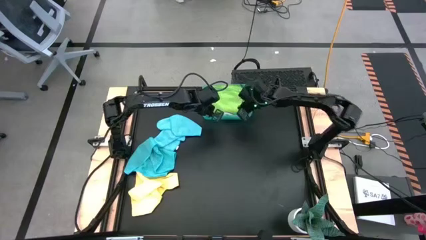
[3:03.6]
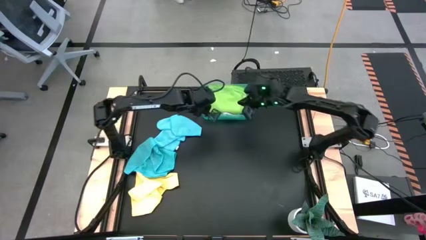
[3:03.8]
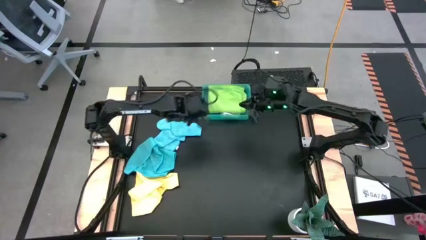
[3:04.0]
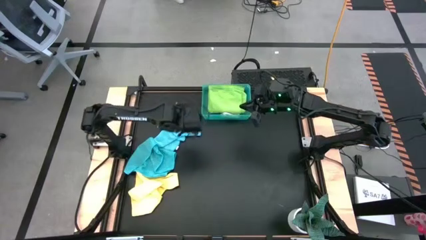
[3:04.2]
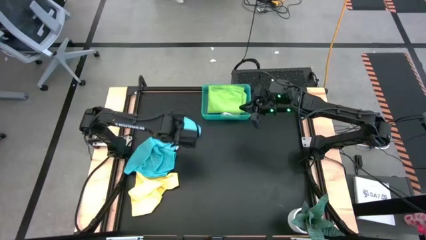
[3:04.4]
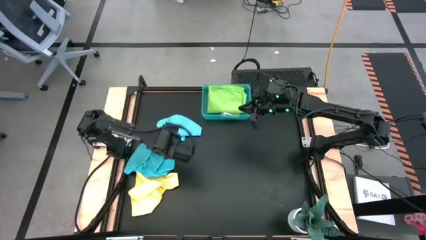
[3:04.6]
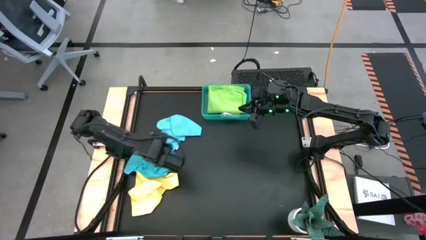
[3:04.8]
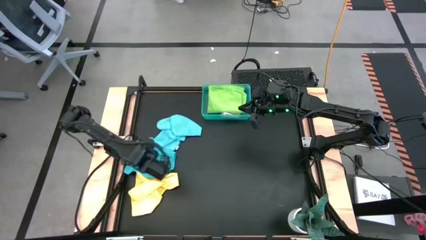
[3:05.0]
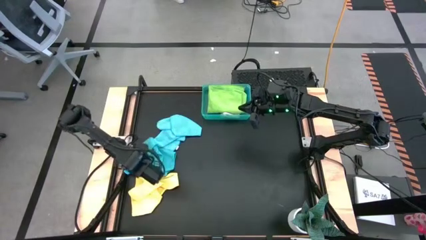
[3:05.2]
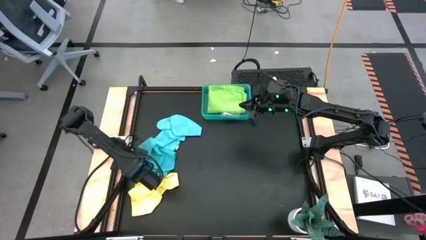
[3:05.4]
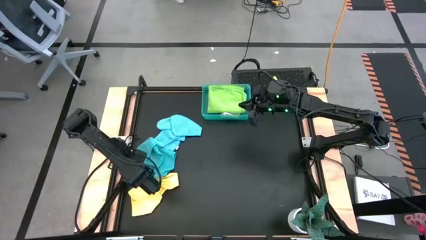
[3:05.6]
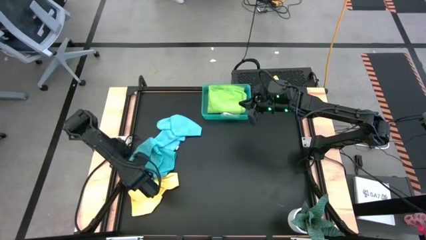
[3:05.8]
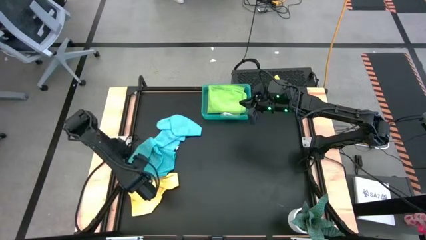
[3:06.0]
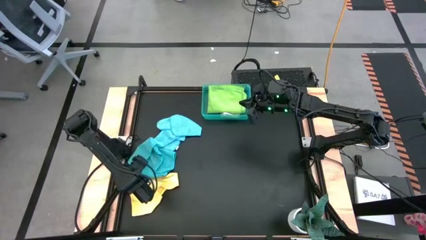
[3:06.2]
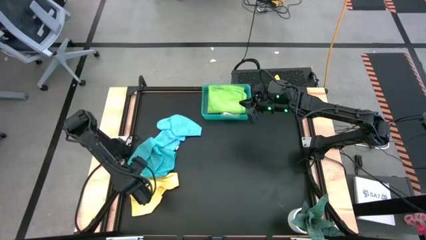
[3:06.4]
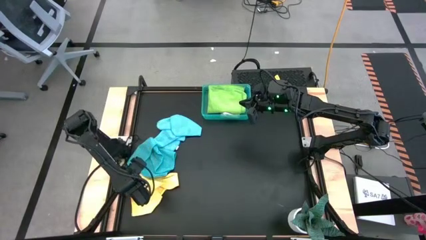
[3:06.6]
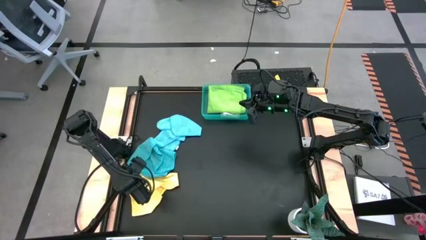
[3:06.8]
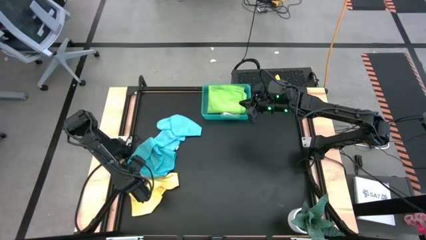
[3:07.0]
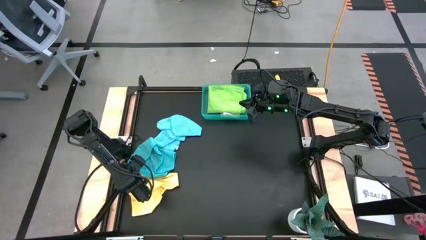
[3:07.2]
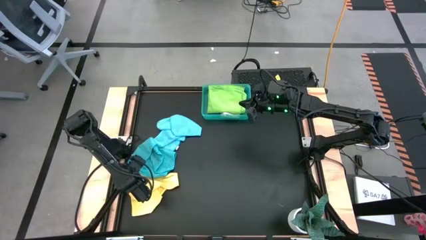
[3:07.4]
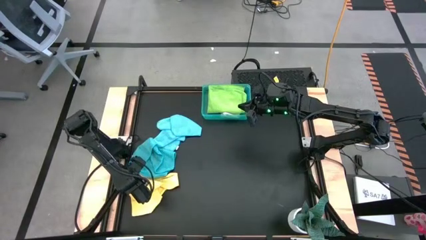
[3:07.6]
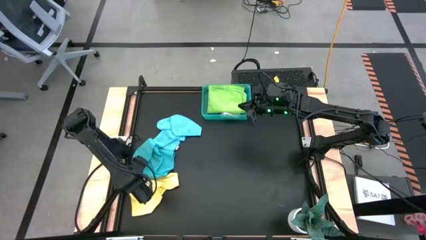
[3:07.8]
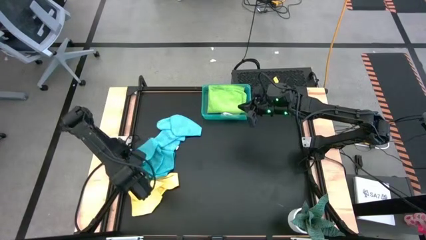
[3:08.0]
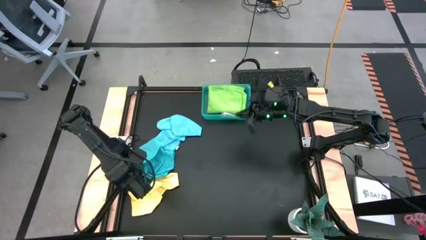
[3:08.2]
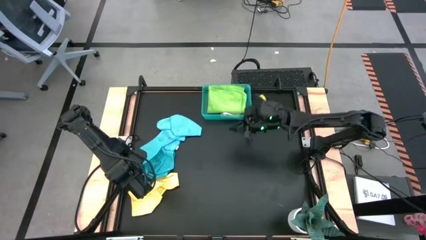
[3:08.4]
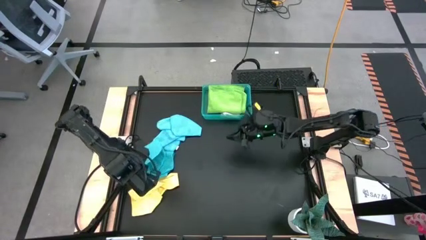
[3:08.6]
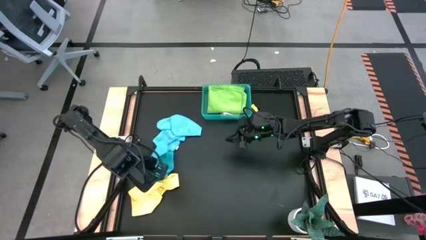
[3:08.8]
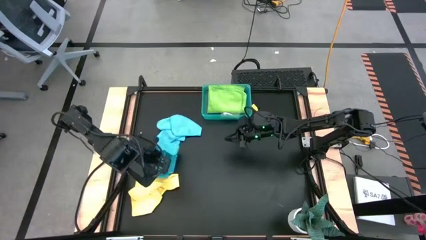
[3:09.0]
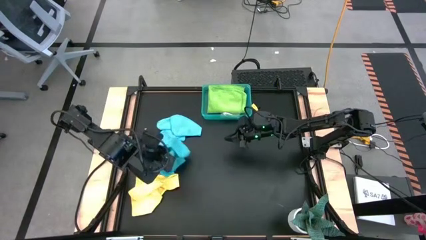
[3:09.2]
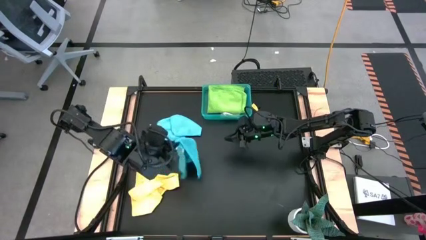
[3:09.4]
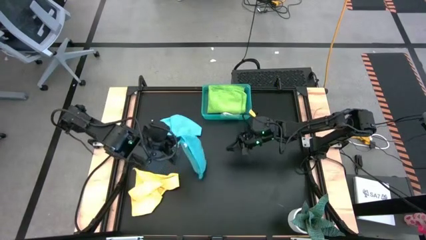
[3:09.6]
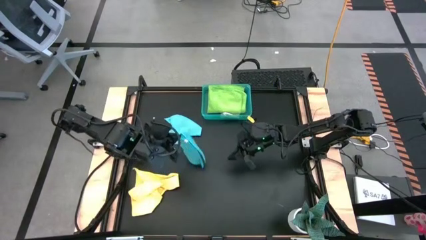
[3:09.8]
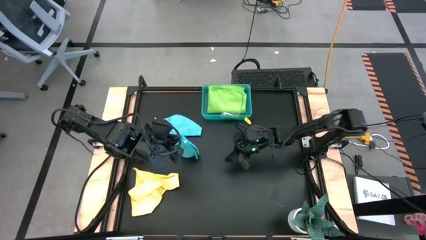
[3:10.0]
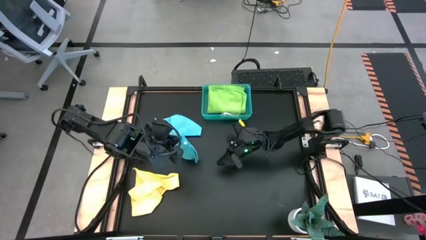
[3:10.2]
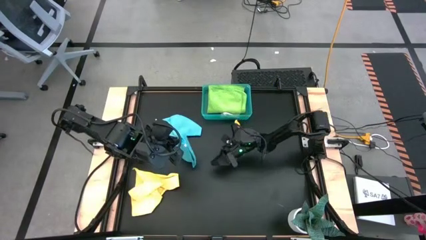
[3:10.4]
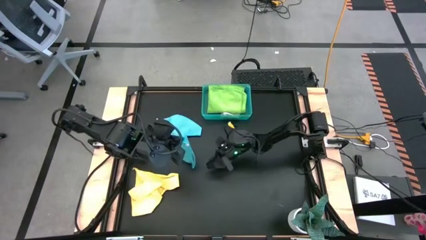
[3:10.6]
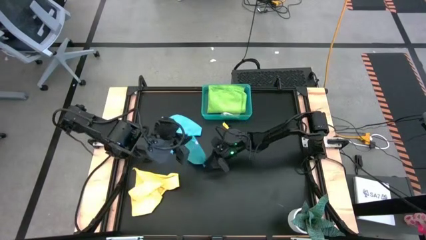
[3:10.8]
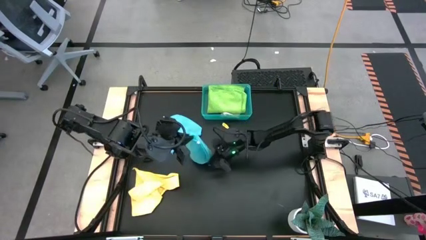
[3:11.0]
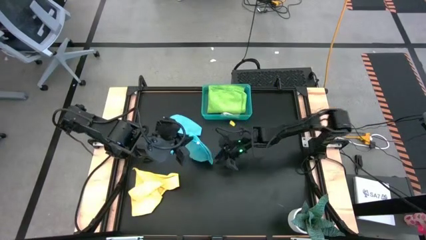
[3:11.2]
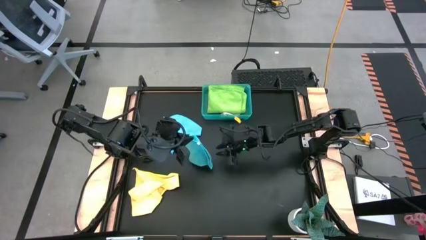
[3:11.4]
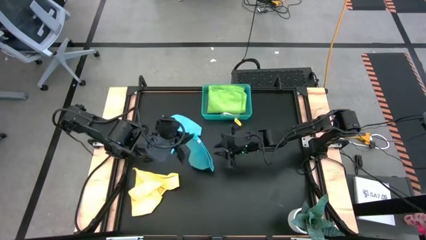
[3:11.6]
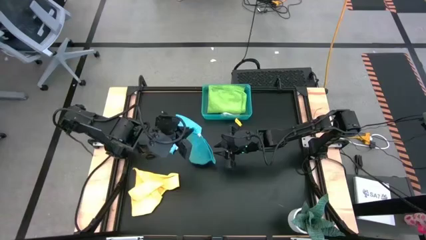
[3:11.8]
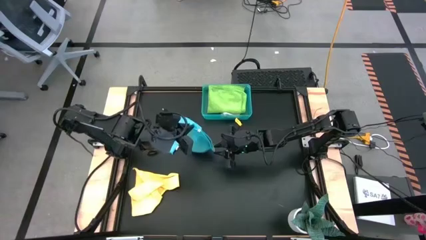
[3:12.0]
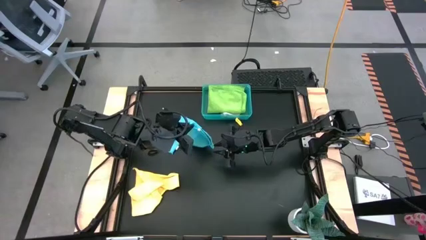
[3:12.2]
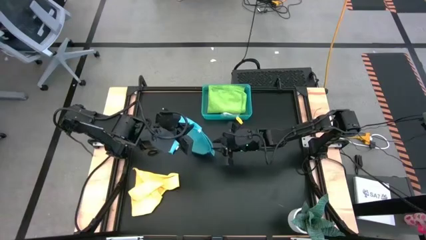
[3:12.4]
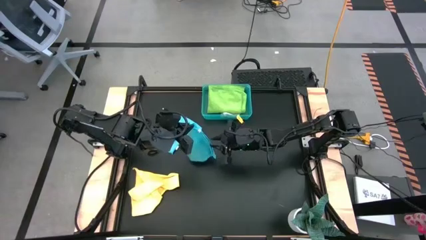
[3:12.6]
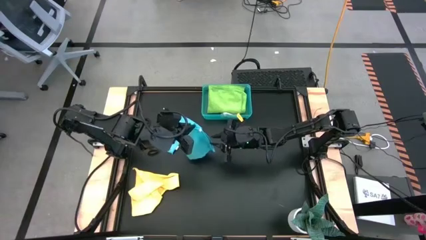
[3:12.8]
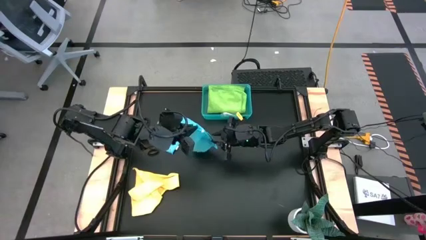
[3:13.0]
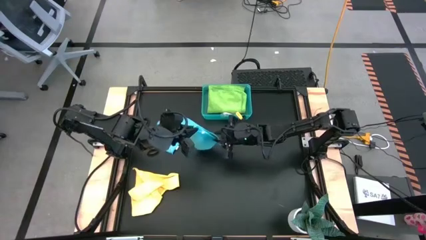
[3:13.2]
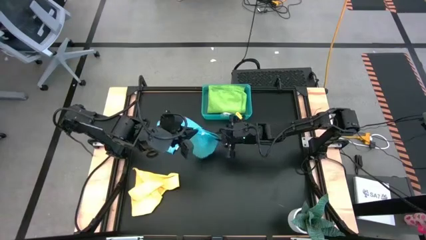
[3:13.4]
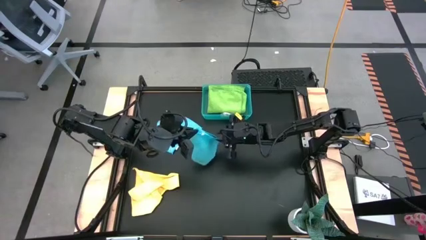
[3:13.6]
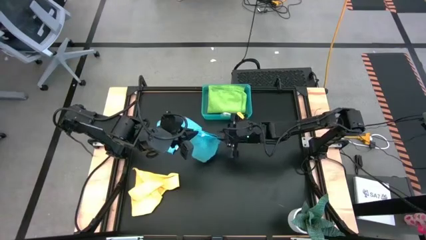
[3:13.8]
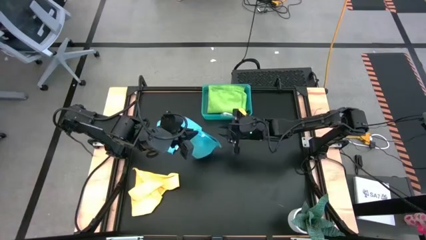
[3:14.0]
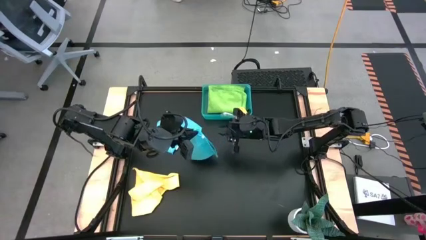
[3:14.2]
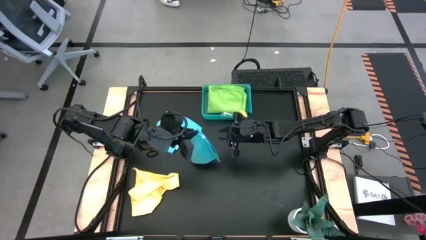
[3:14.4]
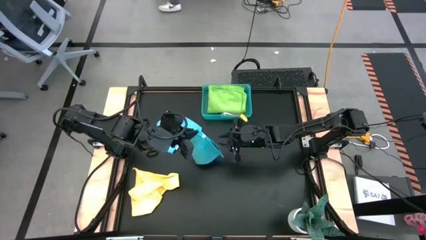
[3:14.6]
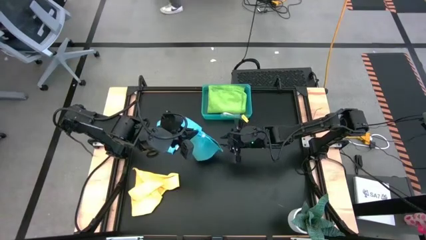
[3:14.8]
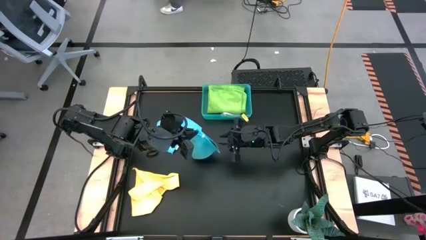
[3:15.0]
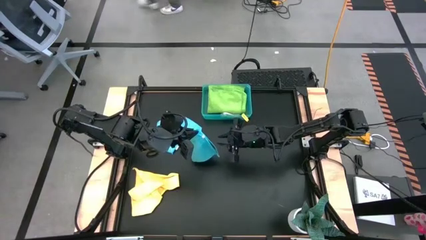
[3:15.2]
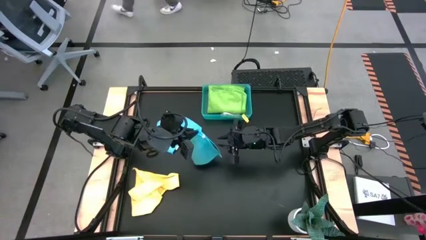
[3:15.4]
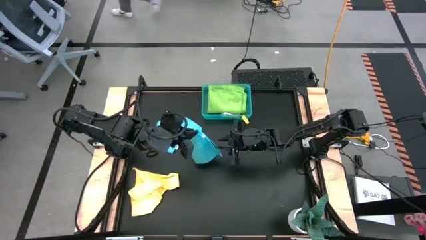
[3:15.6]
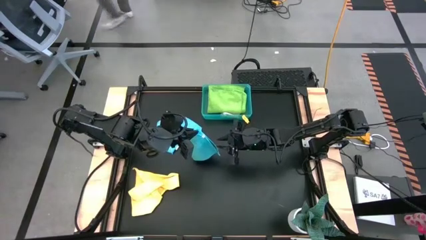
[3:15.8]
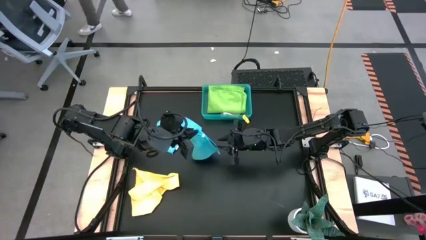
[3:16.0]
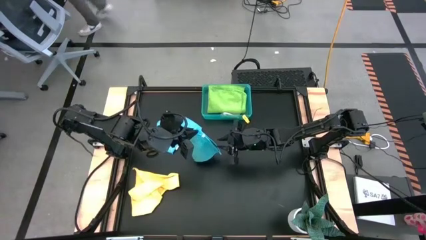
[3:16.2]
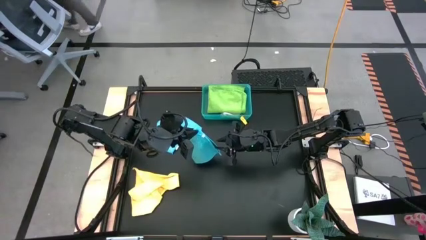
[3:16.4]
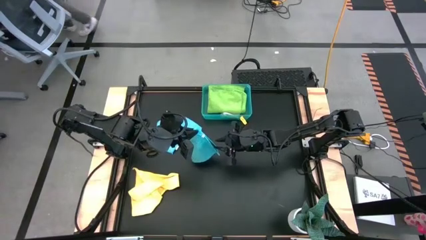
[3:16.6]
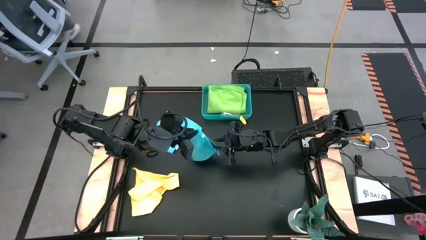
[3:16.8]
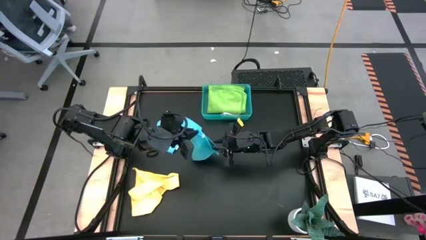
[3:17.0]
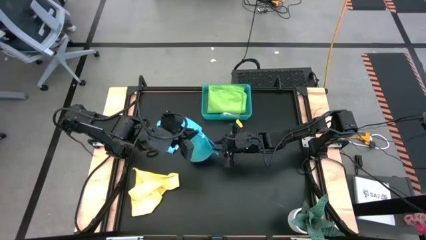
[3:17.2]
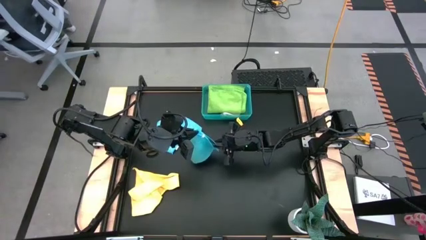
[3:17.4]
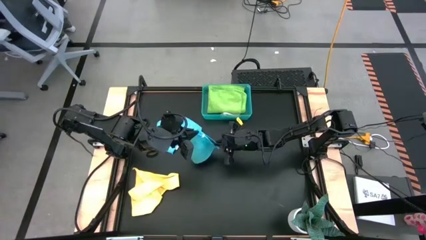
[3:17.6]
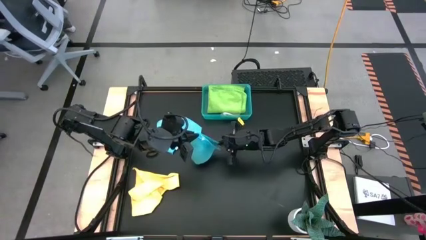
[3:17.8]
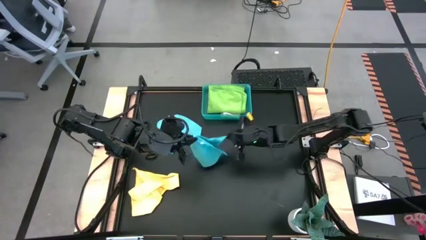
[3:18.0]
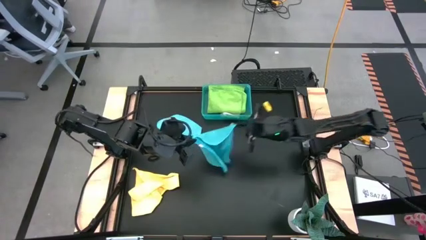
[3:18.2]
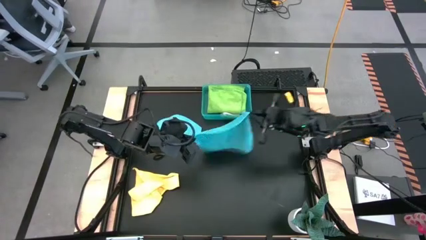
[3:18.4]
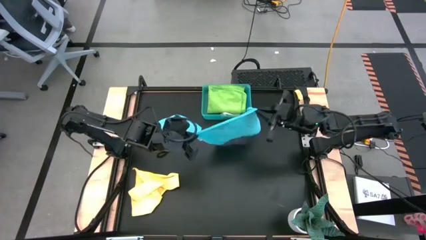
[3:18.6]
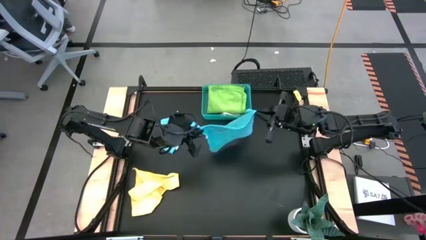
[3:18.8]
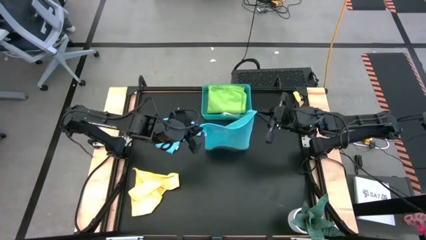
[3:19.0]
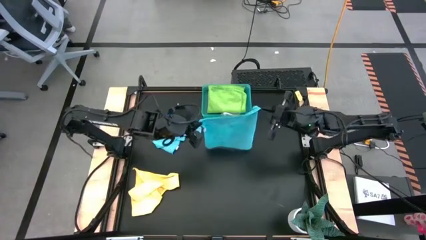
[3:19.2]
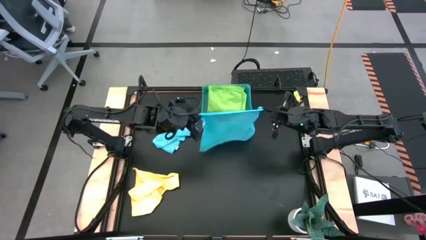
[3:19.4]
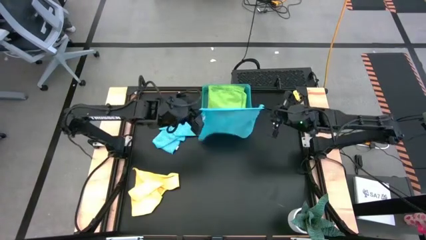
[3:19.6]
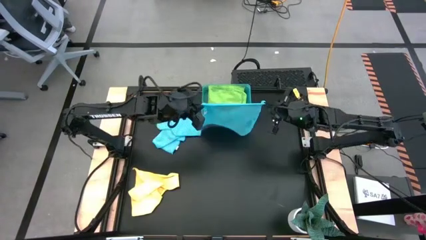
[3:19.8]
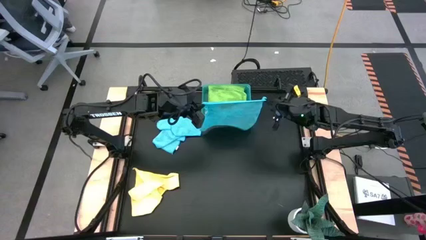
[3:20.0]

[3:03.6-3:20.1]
Task: Fold microfiber towels
Fold the bottom blue microfiber towel
